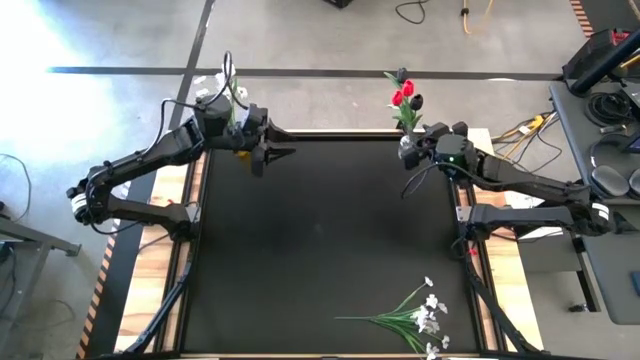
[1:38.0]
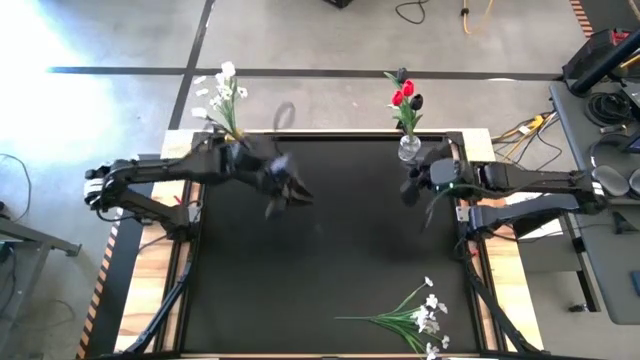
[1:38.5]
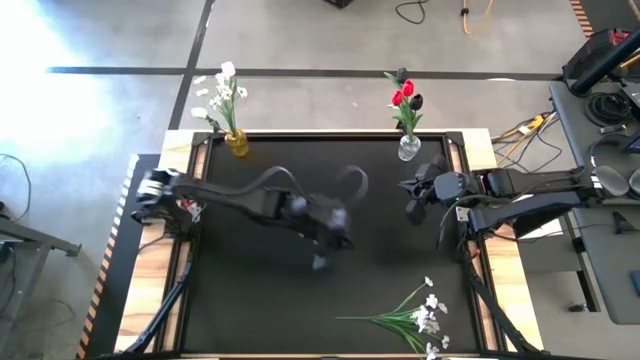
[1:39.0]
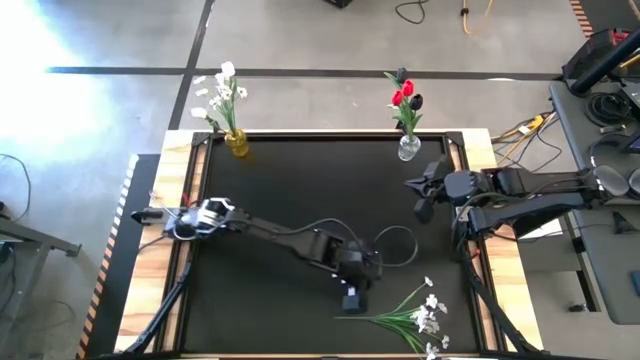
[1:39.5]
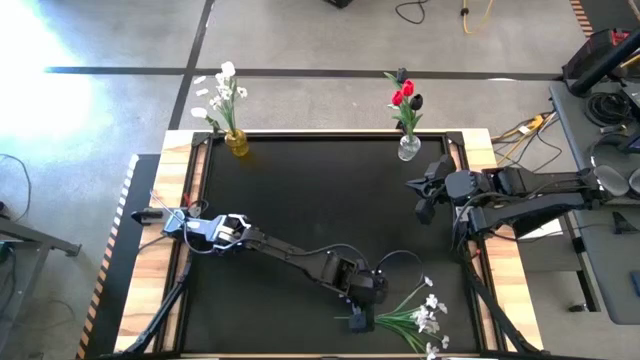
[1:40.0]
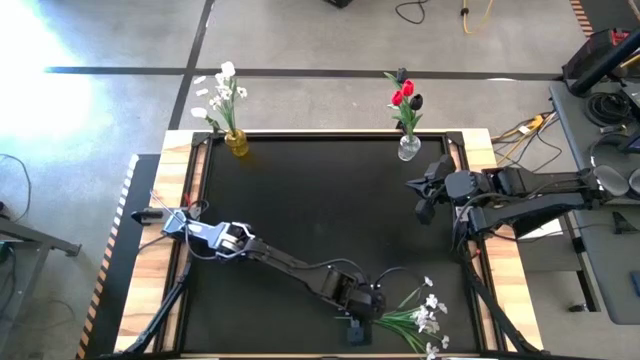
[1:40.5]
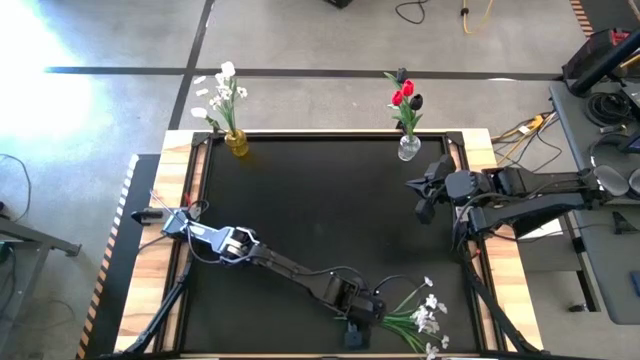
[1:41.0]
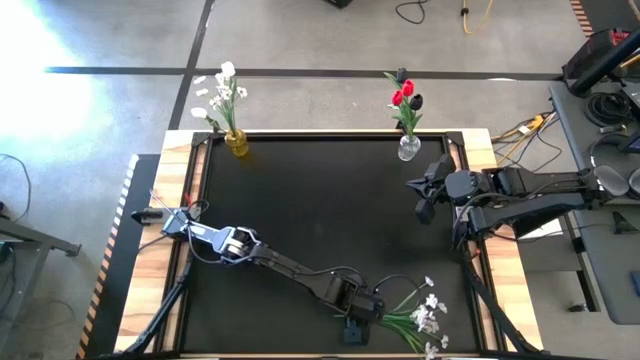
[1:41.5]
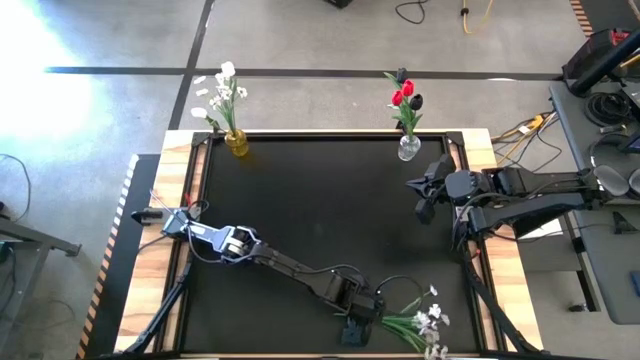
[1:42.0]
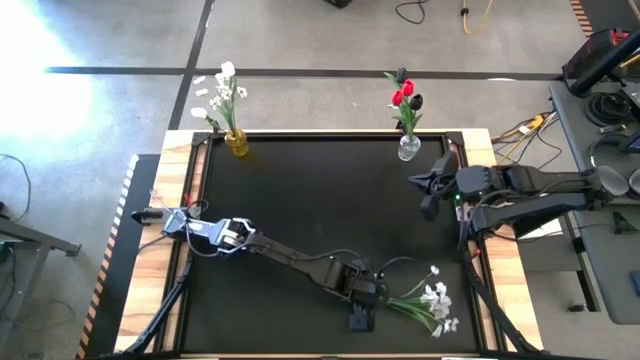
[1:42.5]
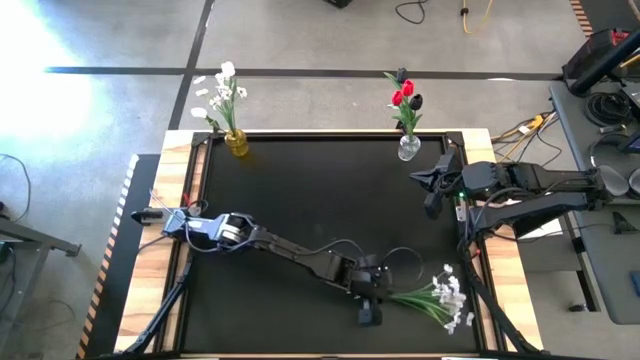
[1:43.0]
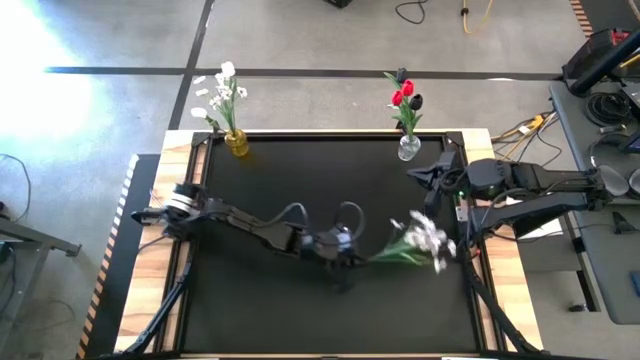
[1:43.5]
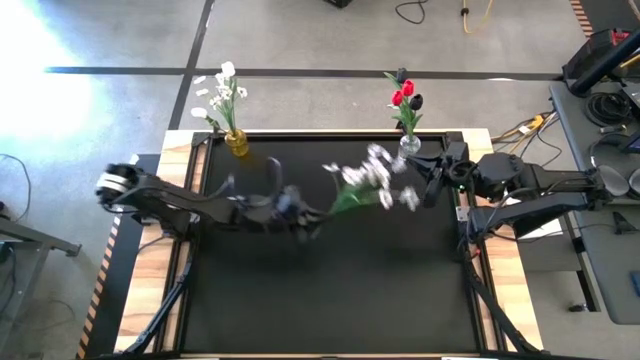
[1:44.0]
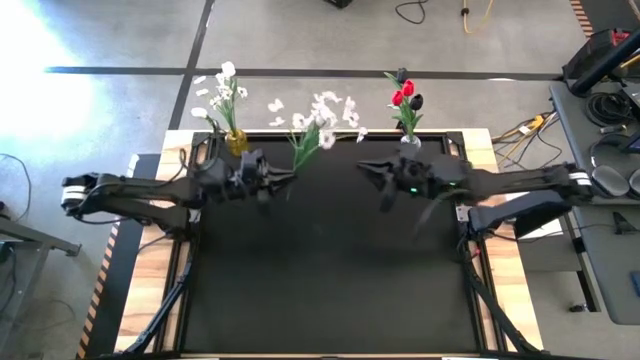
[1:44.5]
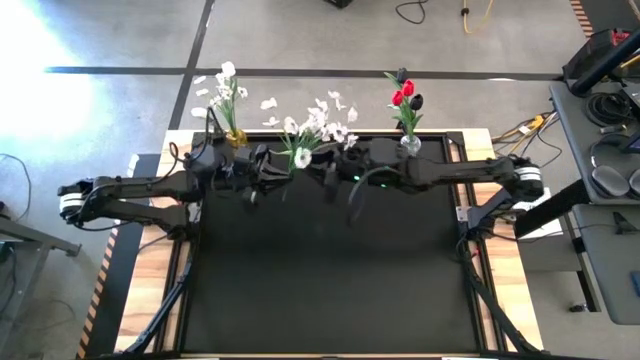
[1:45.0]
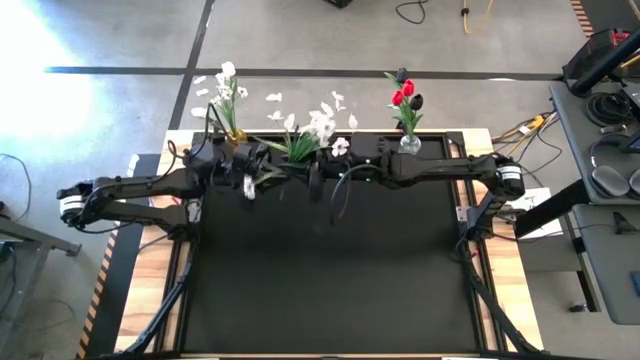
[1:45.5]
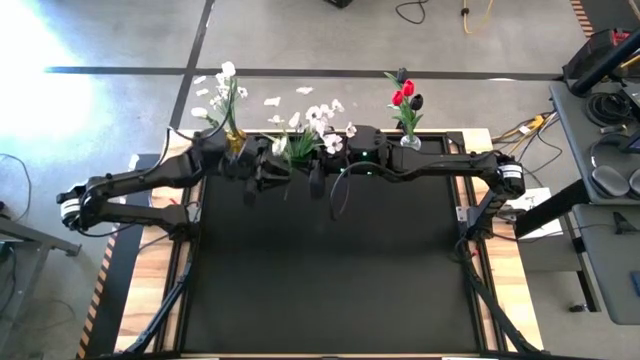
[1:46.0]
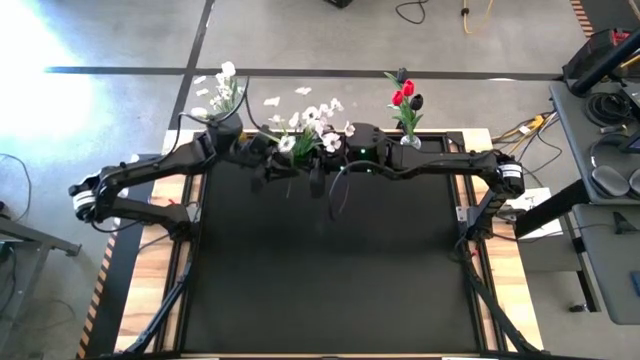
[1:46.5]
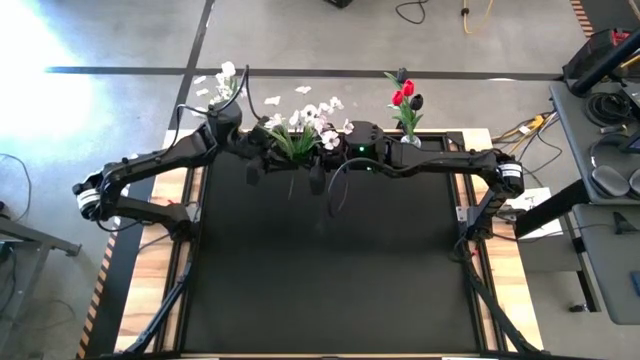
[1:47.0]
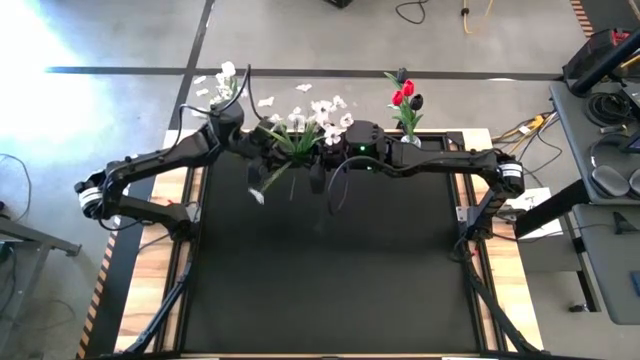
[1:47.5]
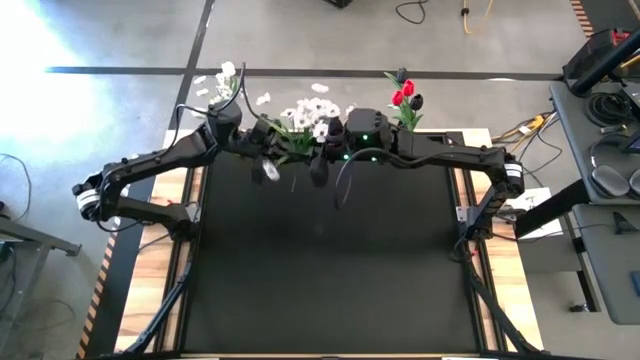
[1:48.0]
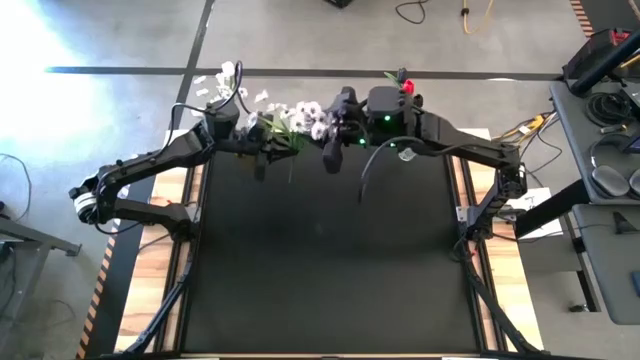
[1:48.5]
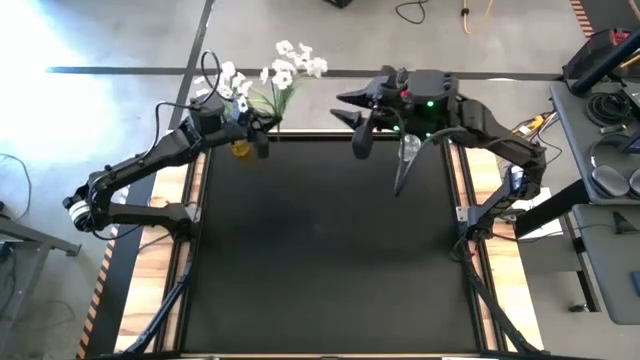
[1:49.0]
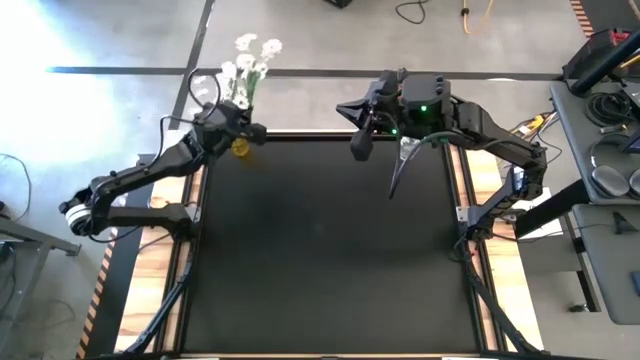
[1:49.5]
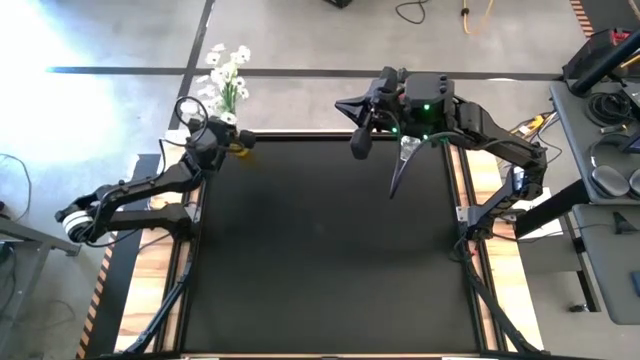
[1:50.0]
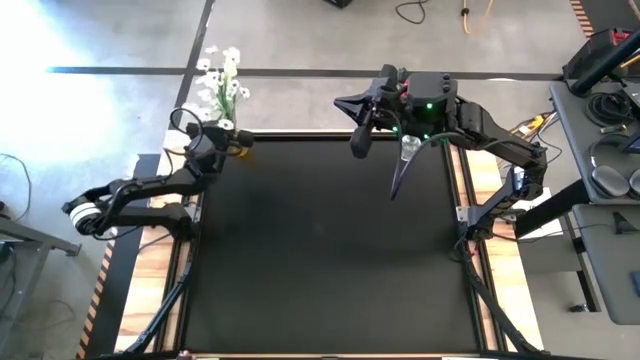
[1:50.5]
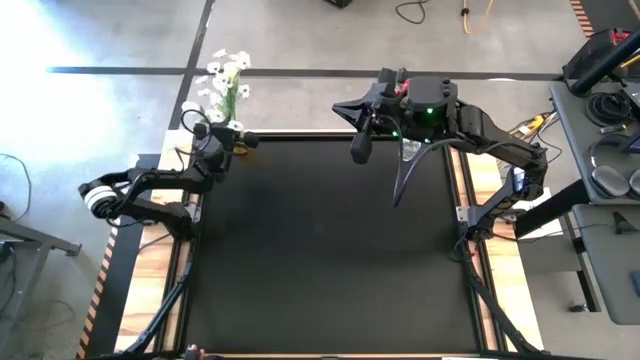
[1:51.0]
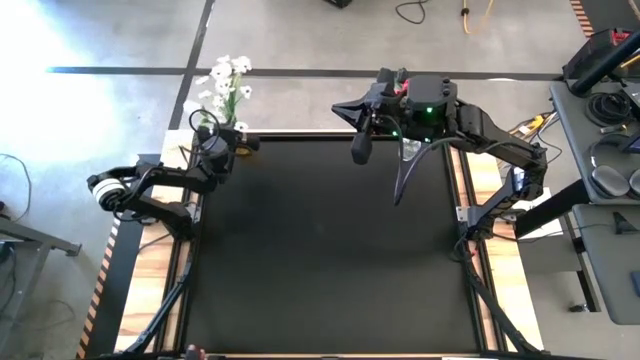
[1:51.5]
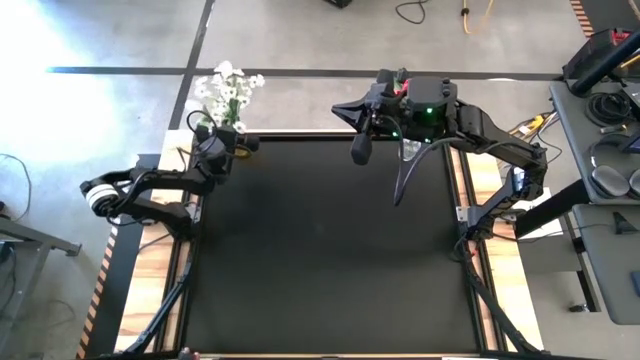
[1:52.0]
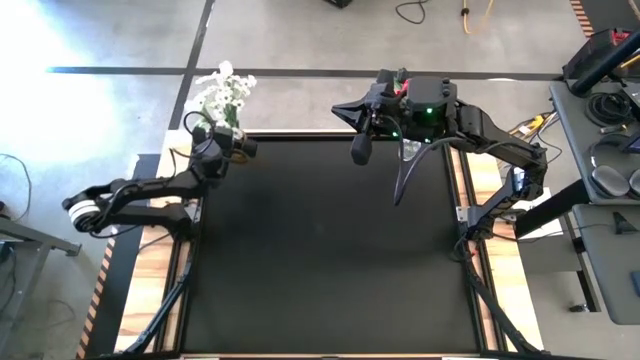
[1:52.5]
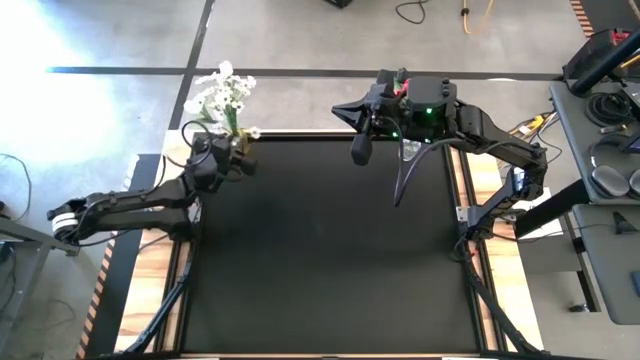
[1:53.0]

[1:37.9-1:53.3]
Task: Sort flowers into vase by color
Put the white flowers into the yellow vase

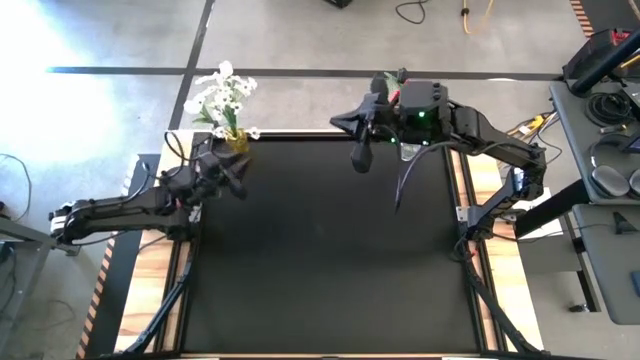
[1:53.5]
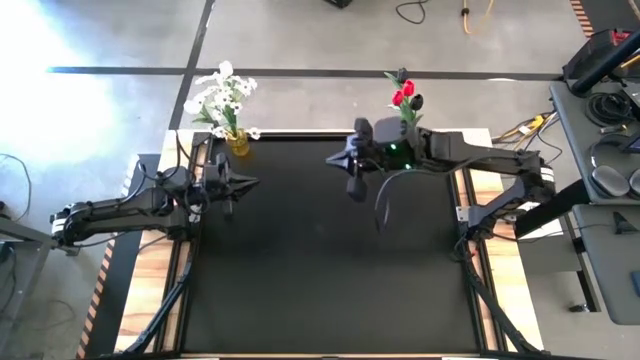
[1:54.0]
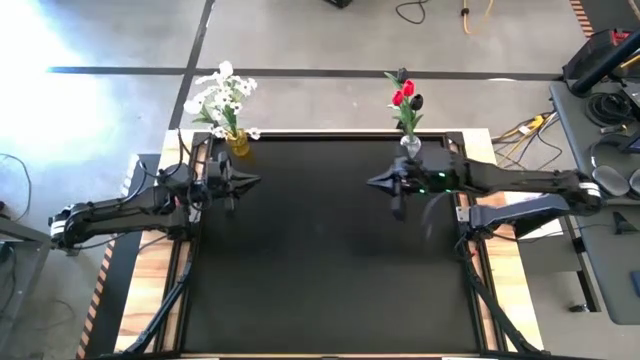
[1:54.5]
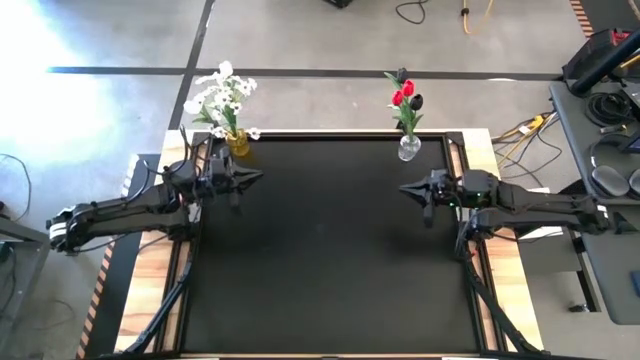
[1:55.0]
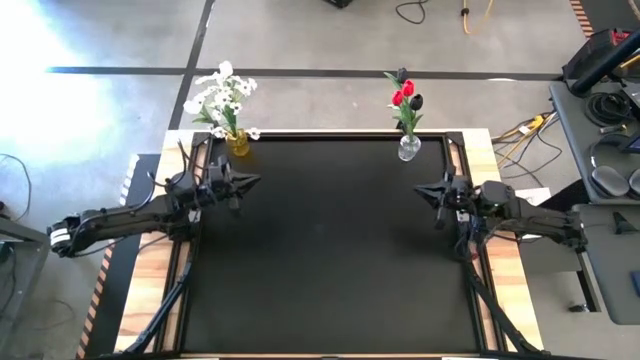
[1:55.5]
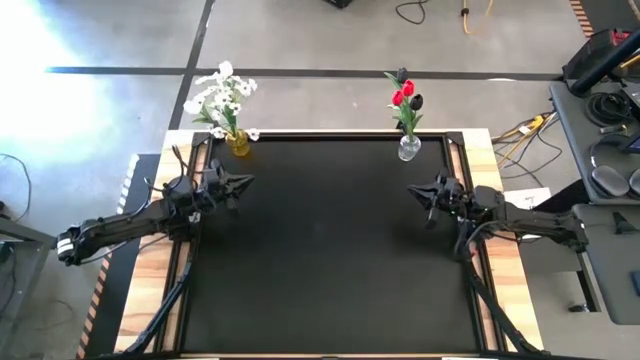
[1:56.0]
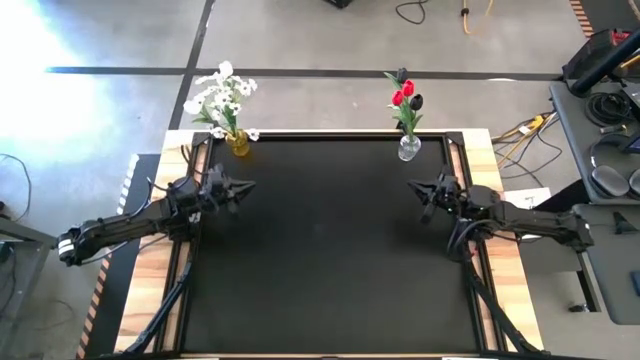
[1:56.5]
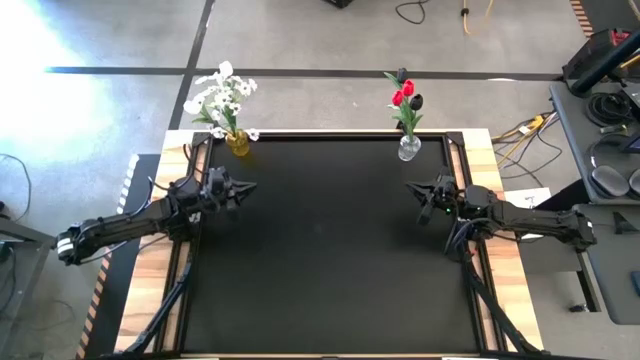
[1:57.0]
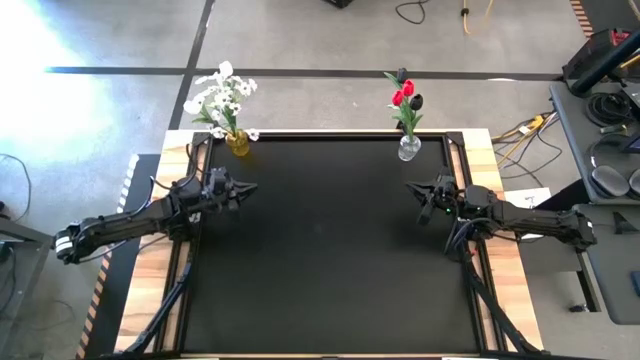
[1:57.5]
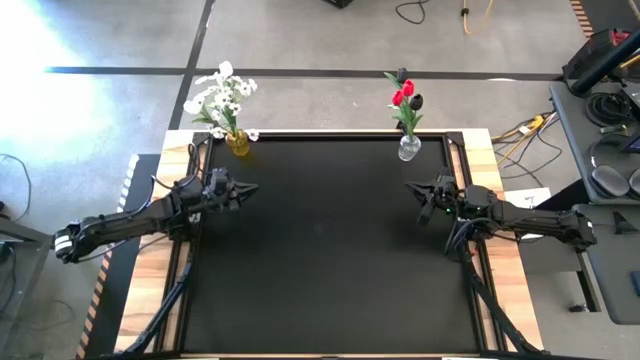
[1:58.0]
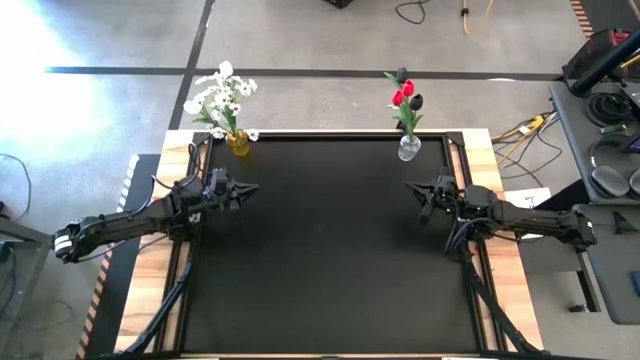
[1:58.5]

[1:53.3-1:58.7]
Return to Home Position
